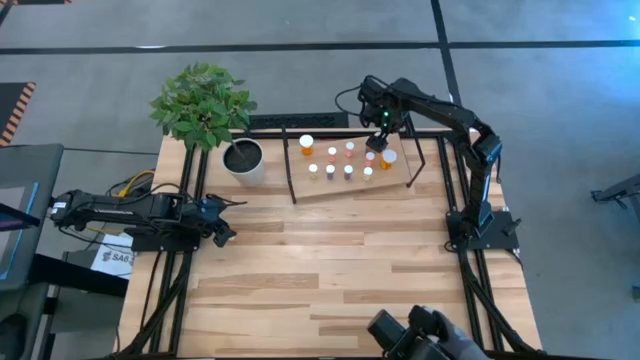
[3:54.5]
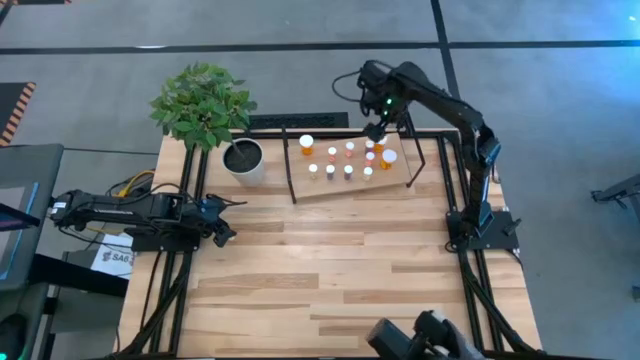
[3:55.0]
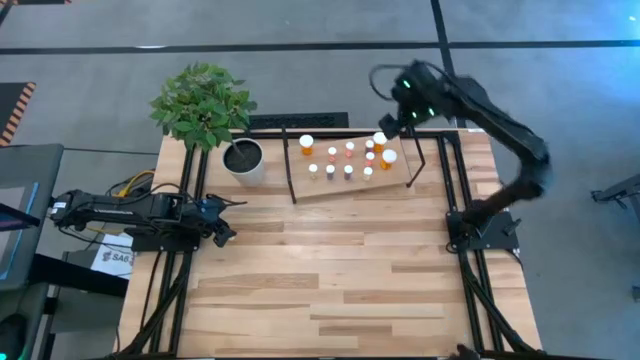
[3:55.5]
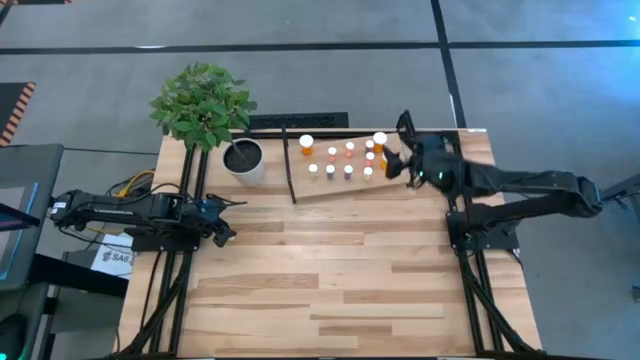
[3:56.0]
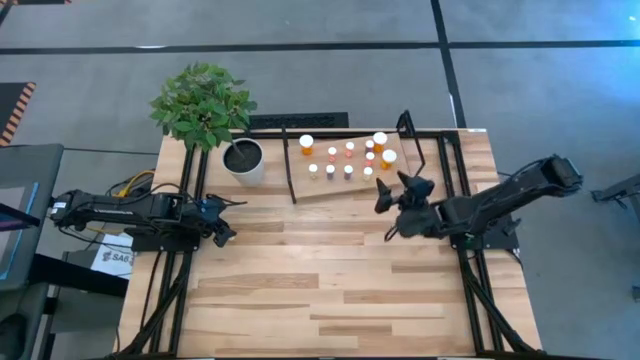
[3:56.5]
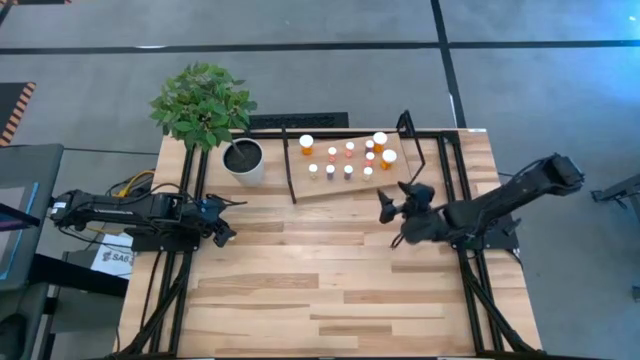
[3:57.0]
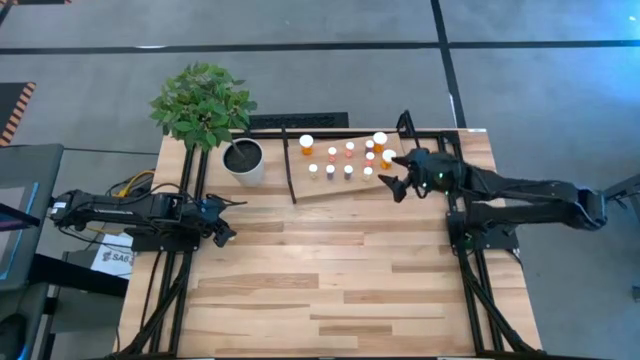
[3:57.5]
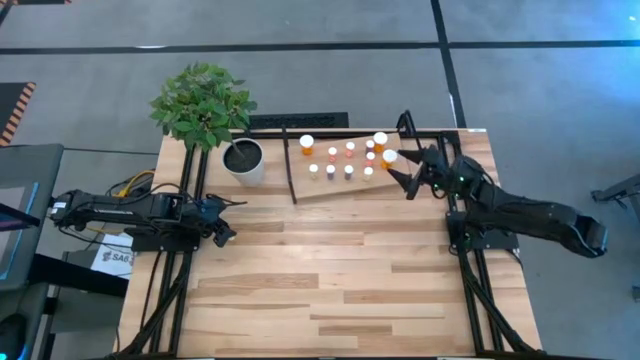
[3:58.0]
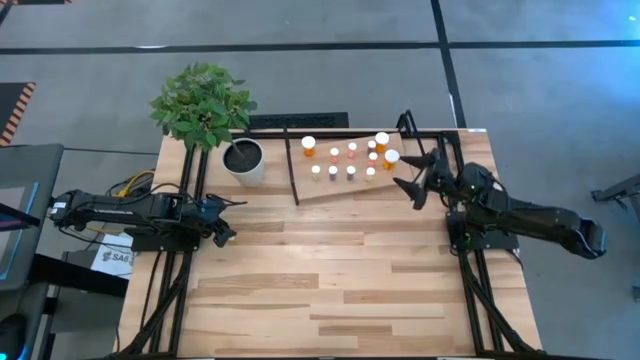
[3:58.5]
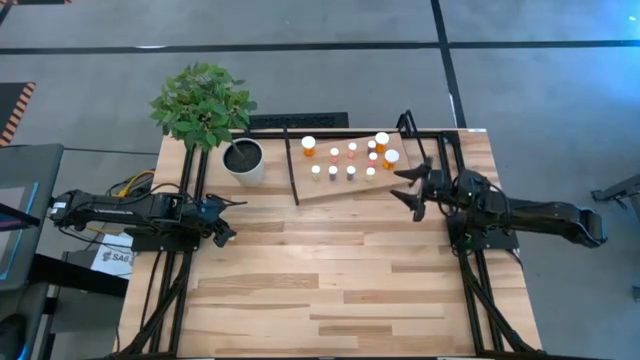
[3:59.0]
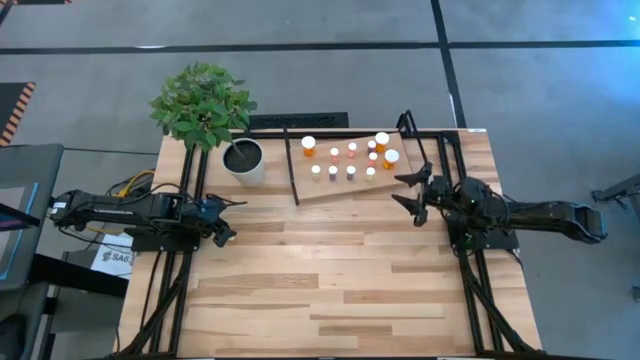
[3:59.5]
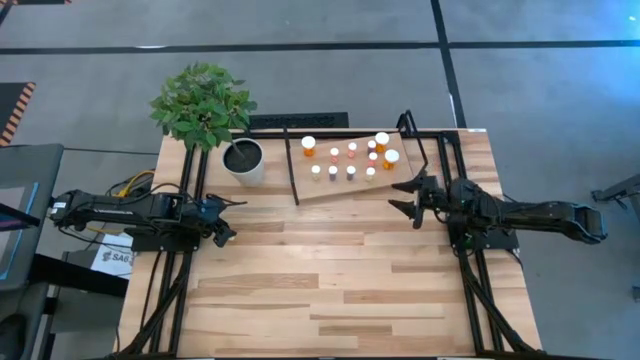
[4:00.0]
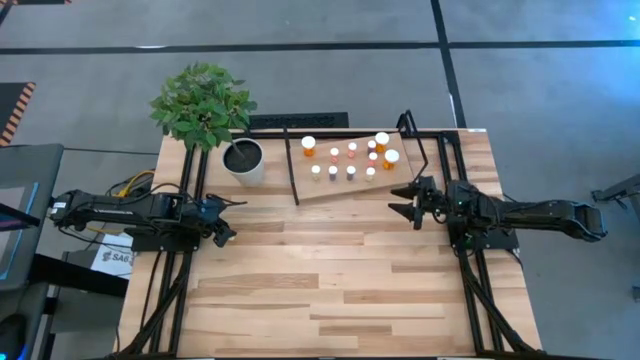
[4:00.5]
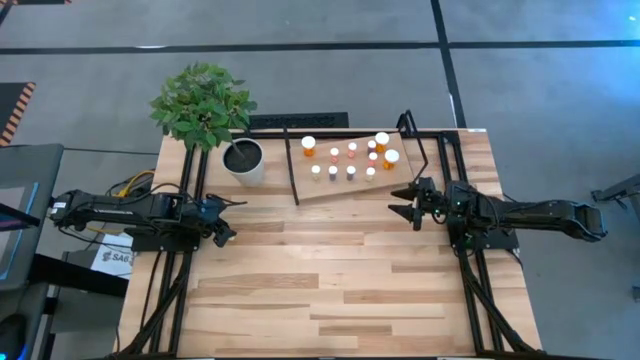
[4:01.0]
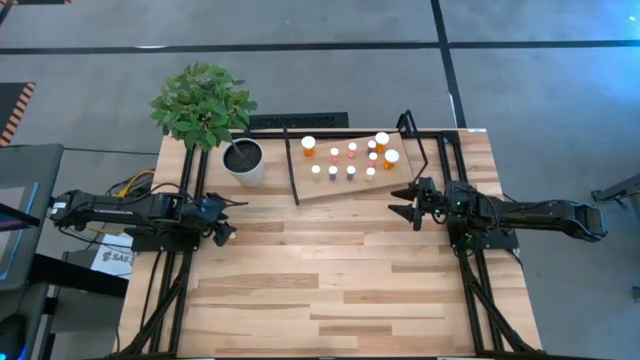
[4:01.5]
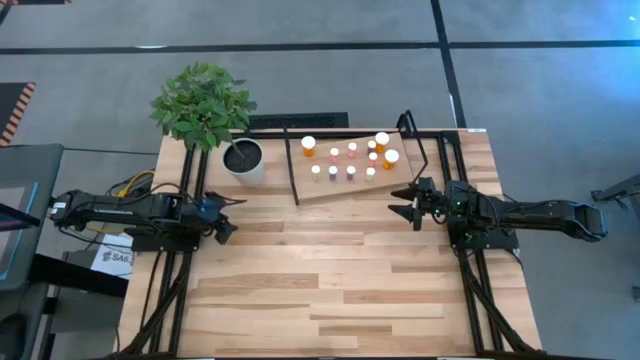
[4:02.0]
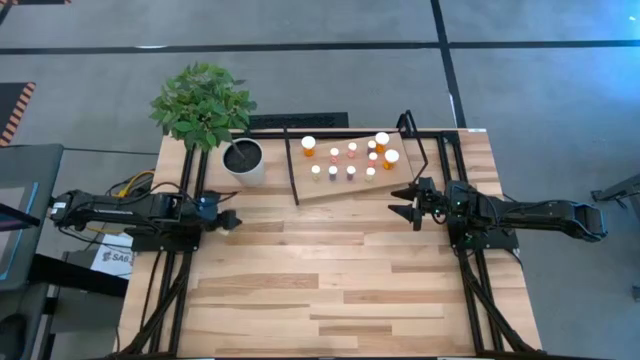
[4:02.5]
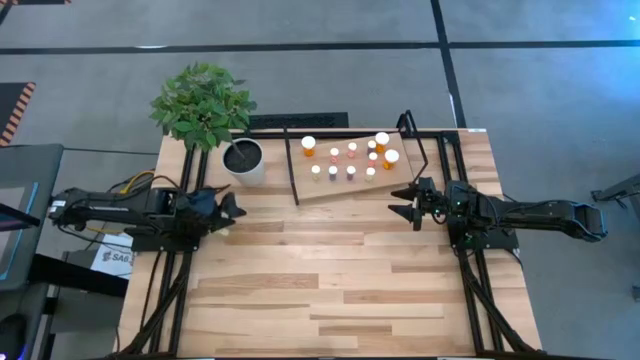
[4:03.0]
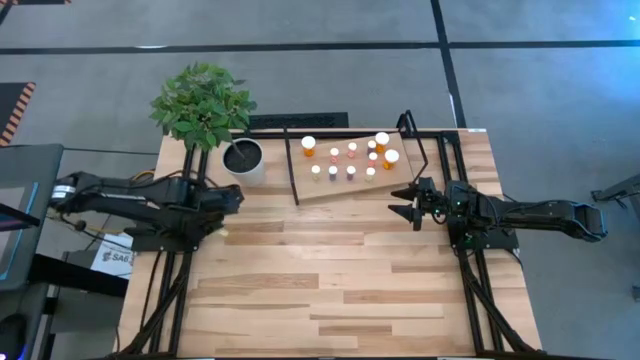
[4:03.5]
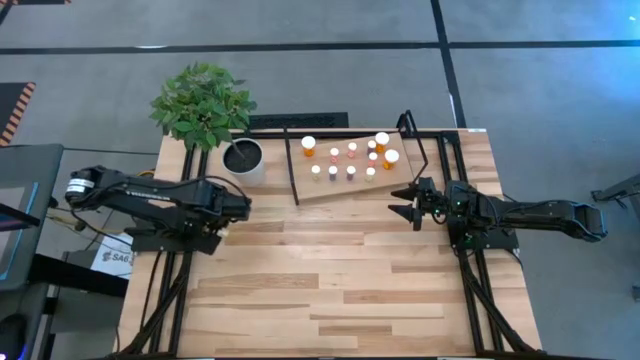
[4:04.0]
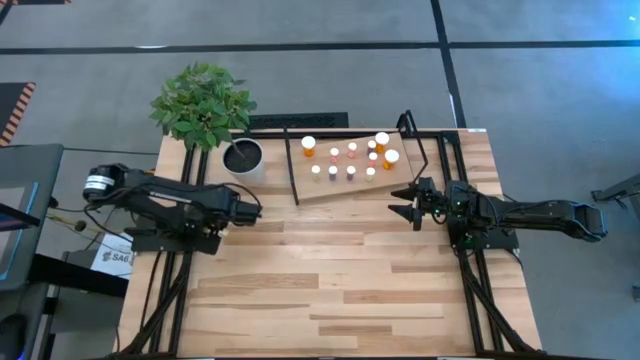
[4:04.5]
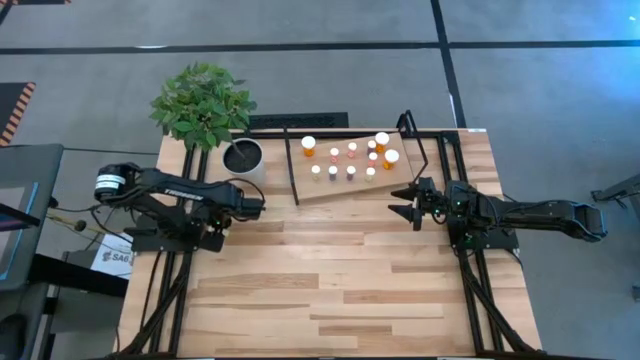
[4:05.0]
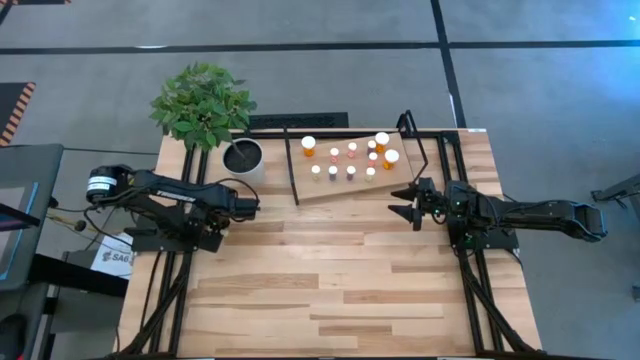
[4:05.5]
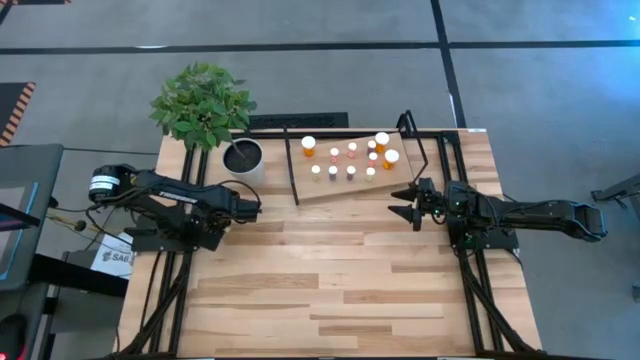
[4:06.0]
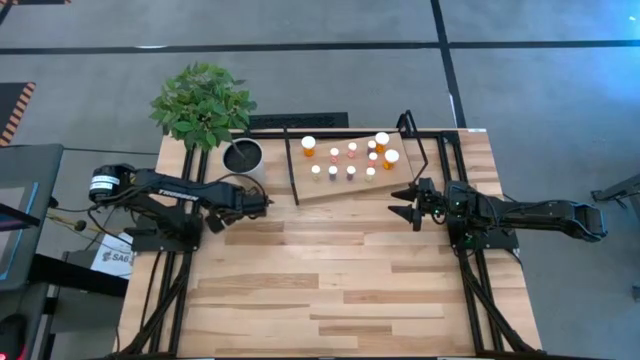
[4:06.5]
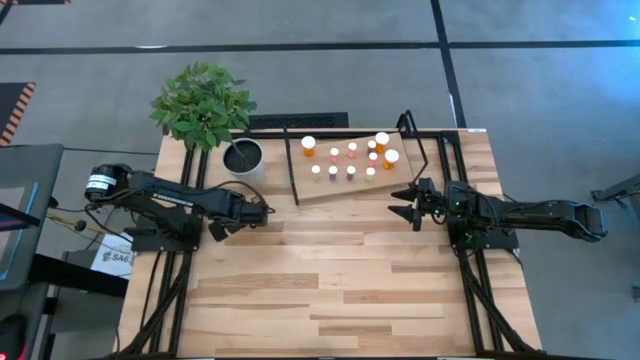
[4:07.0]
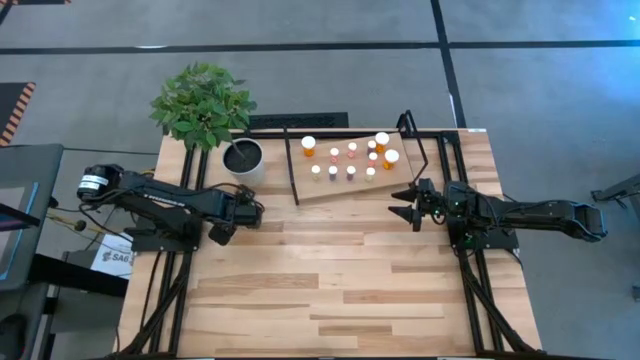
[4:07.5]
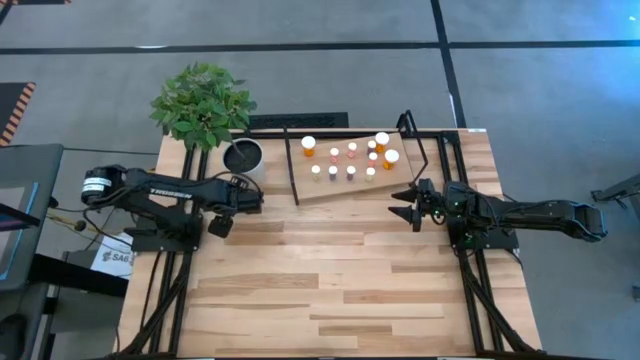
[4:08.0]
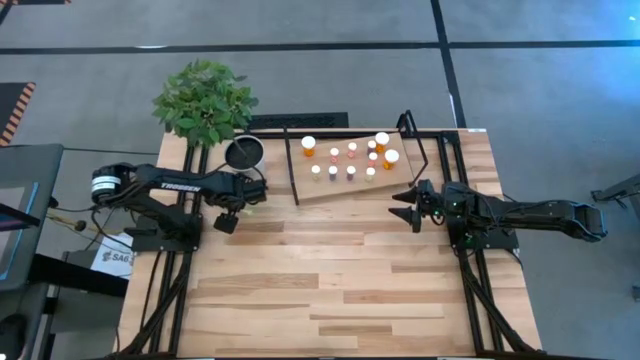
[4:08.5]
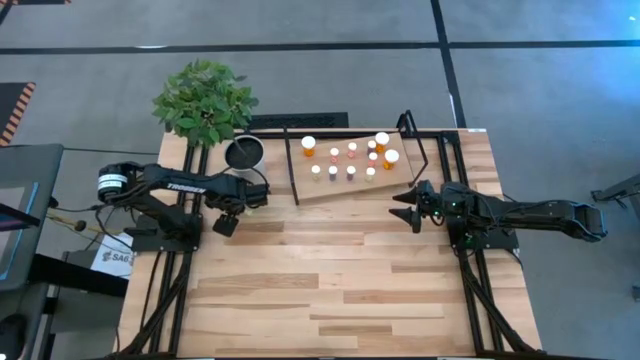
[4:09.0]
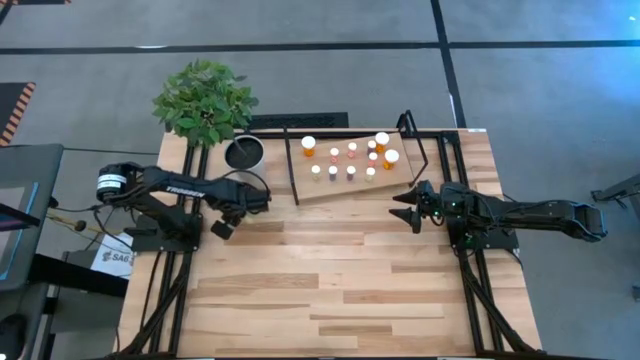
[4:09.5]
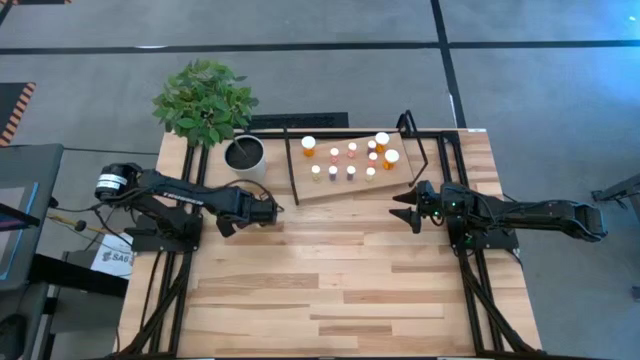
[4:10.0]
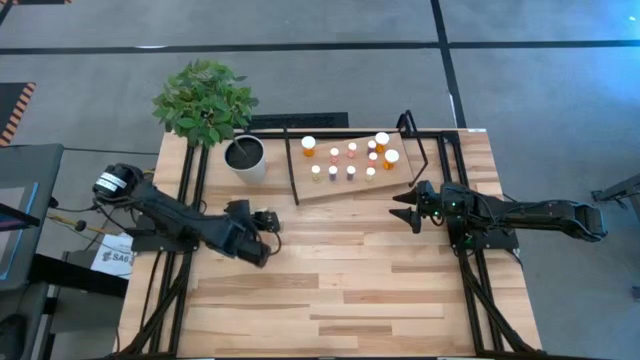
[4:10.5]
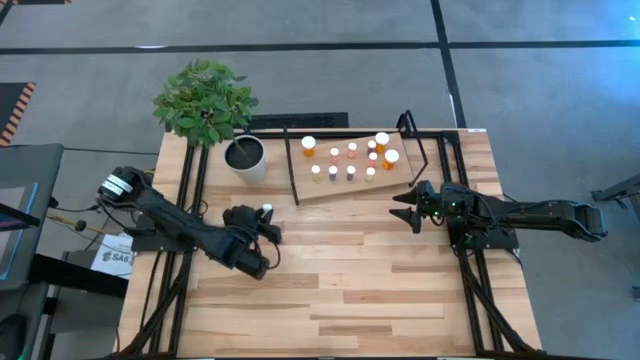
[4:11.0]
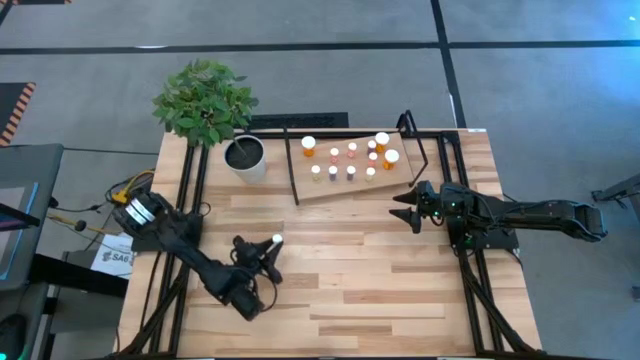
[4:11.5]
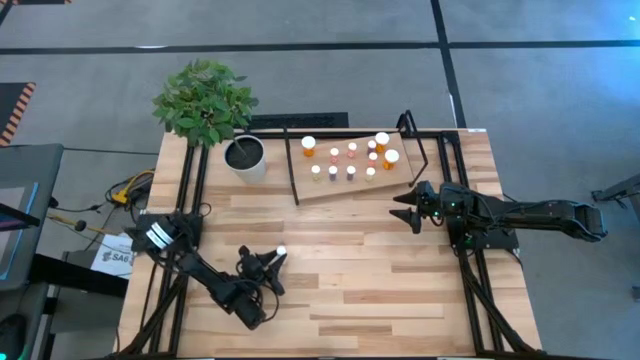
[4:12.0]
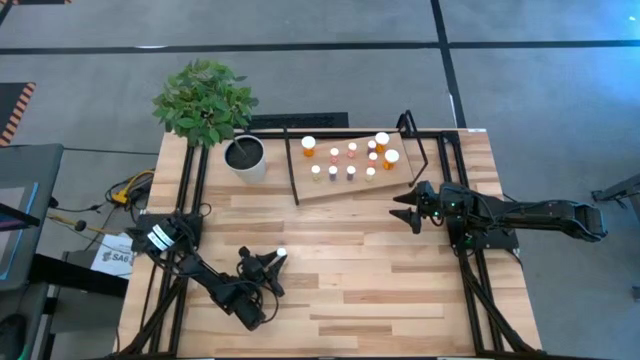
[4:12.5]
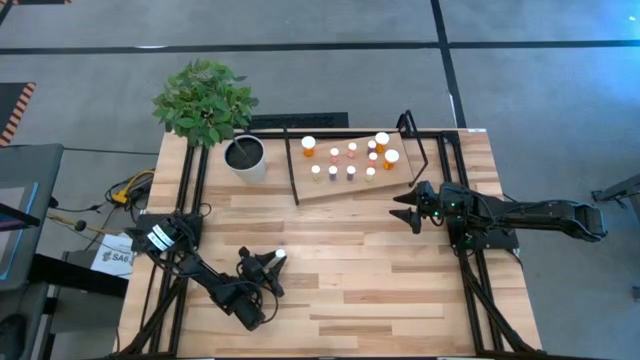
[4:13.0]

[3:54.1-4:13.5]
Task: Pick and place medicine bottles onto shelf by color
Put the yellow pill bottle on the shelf

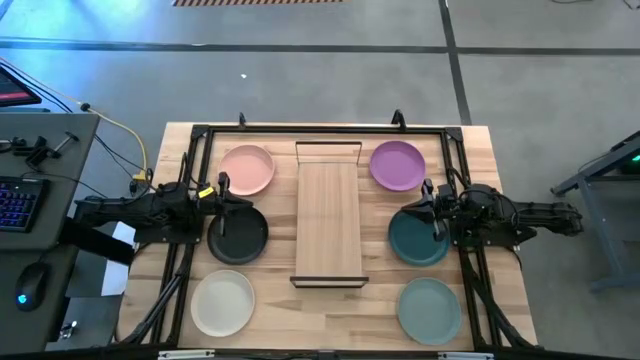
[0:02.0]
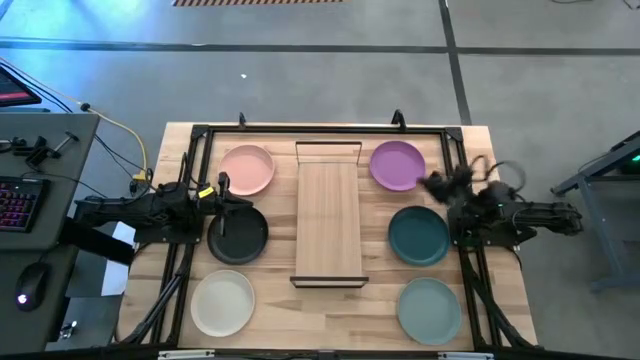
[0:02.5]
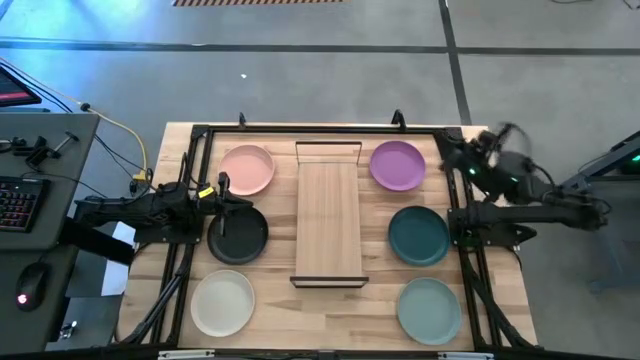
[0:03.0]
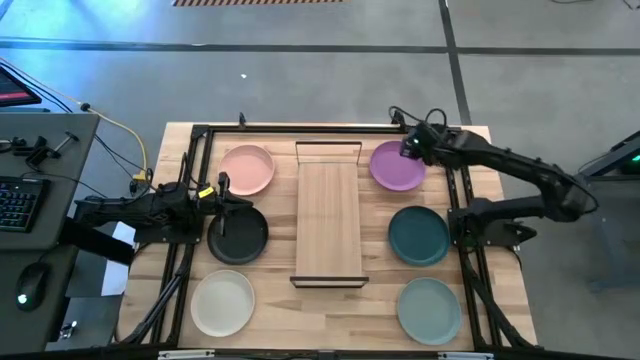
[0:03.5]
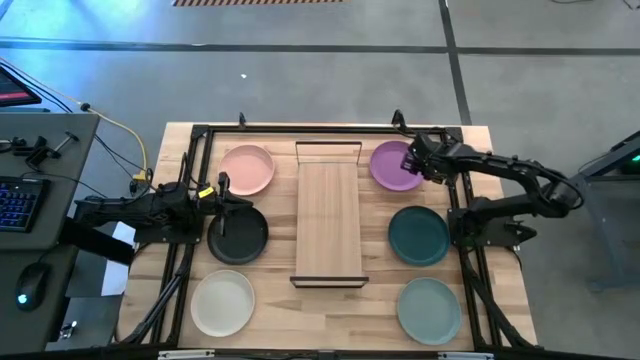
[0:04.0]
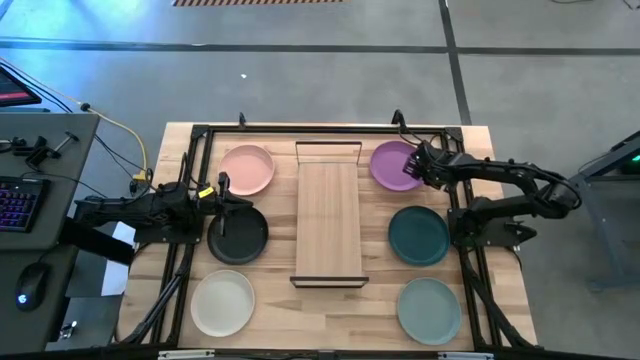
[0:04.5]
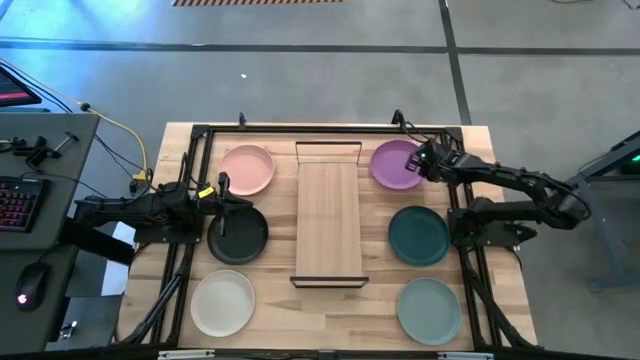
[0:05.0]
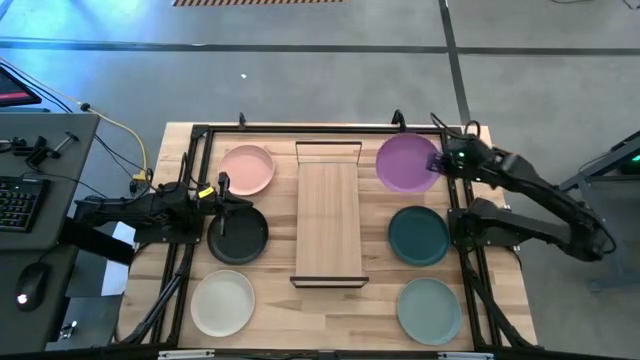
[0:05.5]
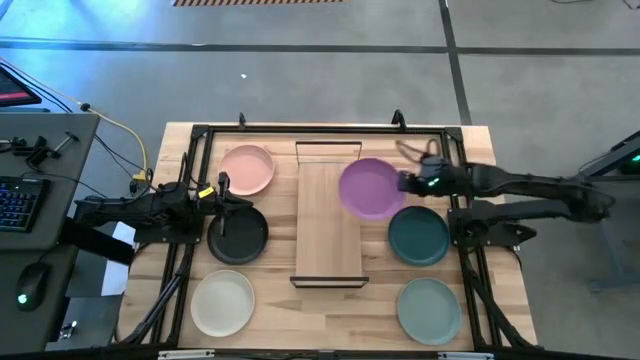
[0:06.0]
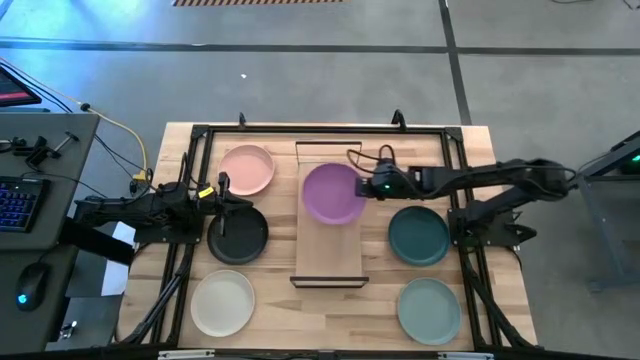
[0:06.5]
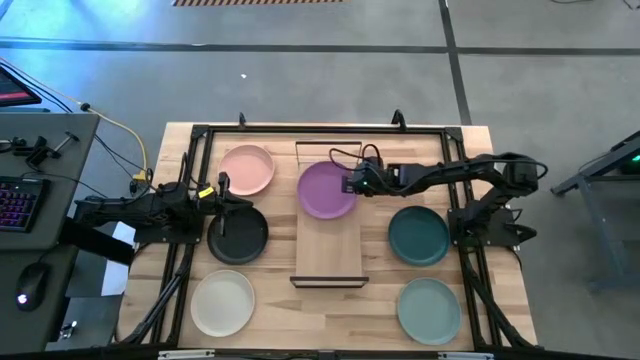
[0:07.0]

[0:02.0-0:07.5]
Task: Place and stack plates onto a shelf
Put the purple plate on the shelf
